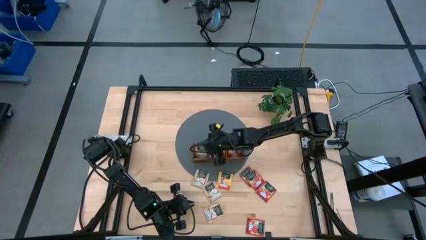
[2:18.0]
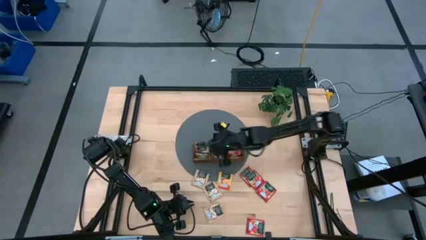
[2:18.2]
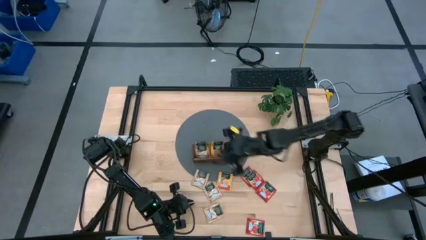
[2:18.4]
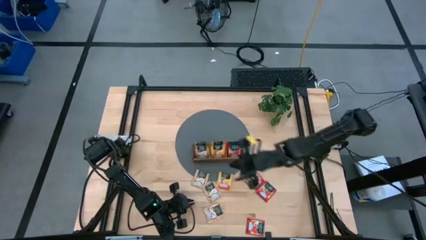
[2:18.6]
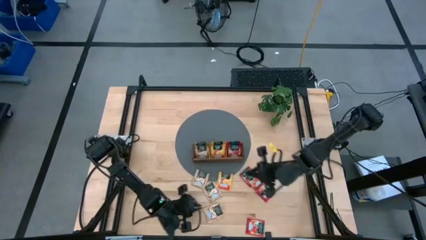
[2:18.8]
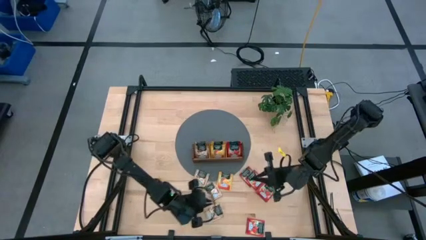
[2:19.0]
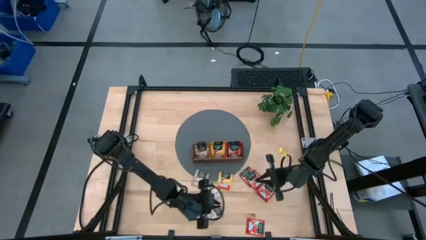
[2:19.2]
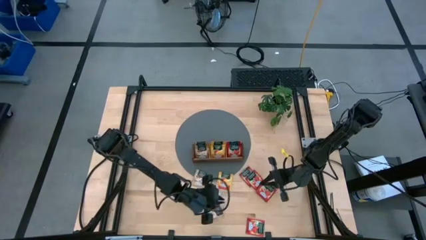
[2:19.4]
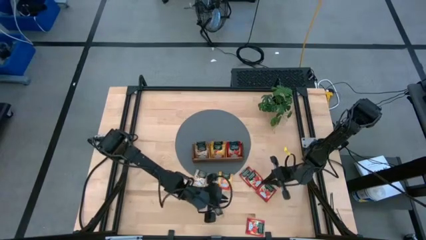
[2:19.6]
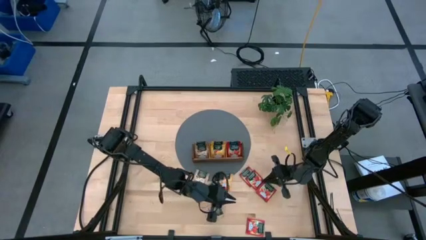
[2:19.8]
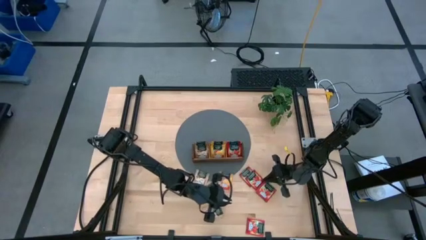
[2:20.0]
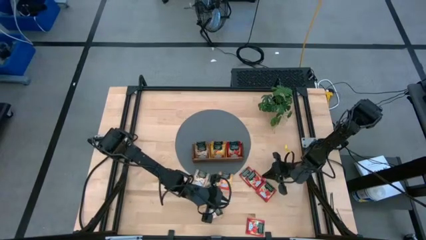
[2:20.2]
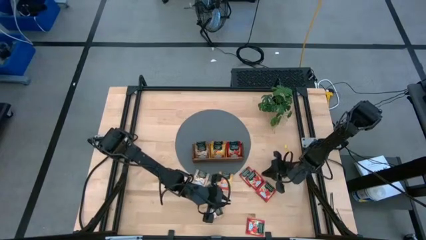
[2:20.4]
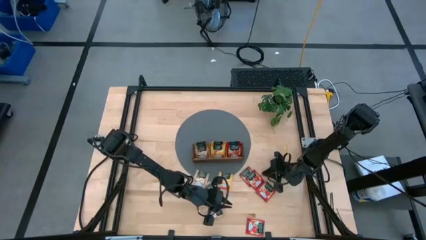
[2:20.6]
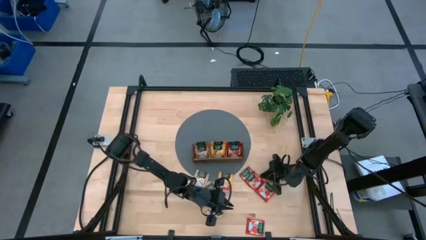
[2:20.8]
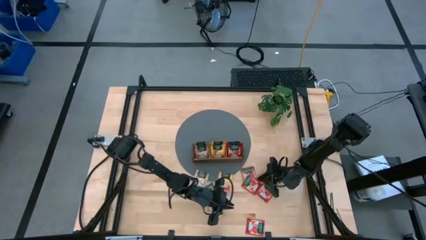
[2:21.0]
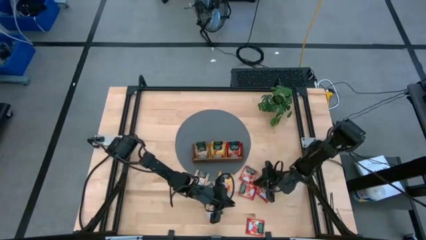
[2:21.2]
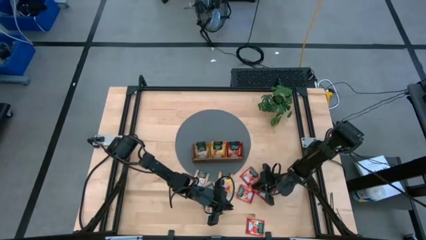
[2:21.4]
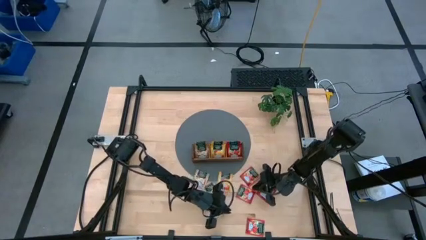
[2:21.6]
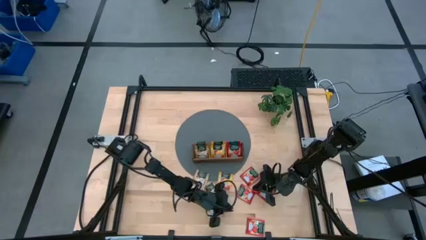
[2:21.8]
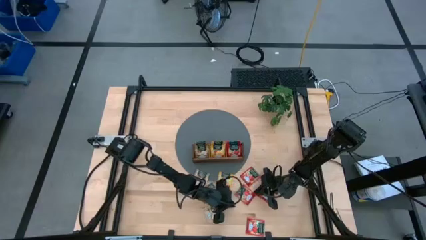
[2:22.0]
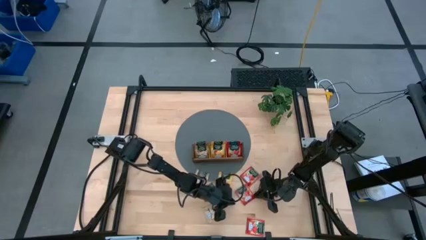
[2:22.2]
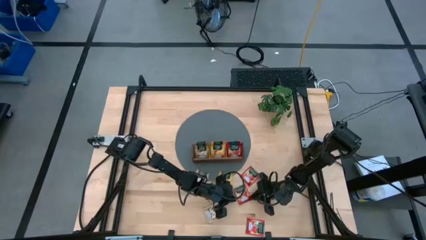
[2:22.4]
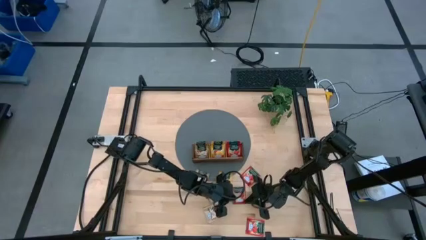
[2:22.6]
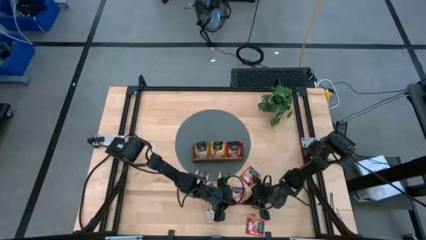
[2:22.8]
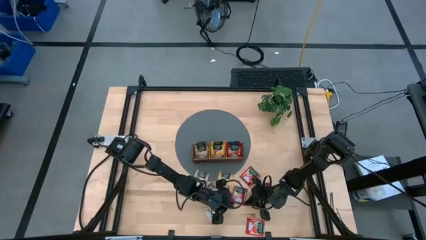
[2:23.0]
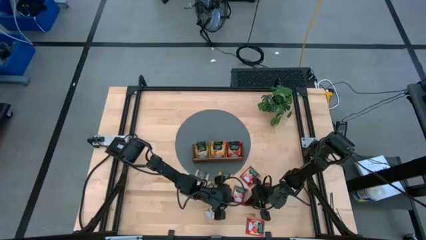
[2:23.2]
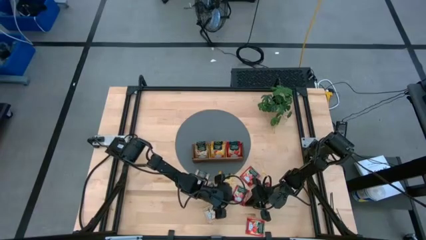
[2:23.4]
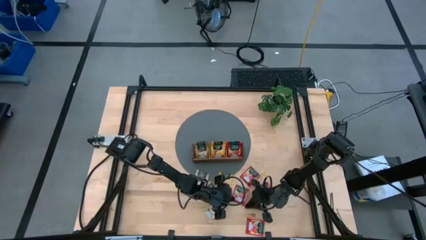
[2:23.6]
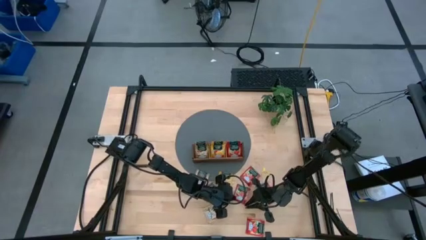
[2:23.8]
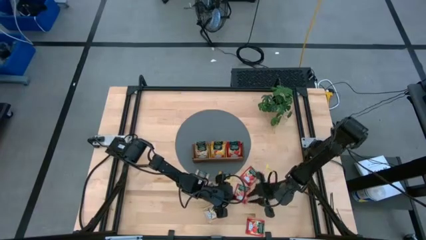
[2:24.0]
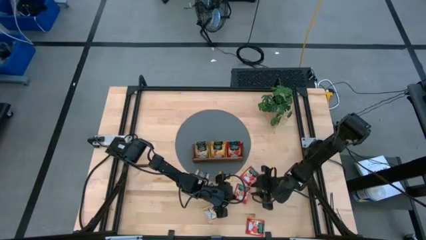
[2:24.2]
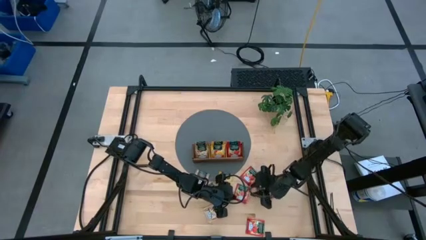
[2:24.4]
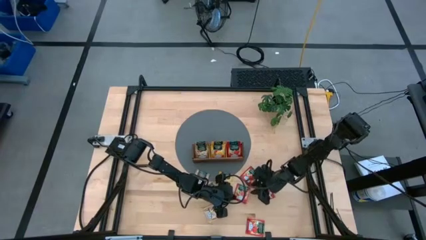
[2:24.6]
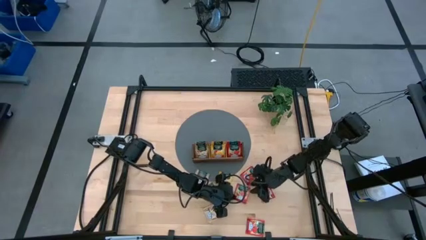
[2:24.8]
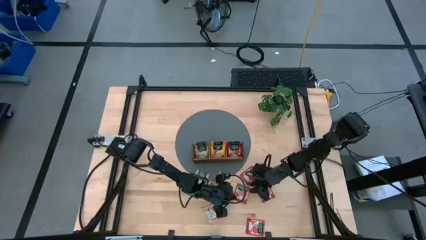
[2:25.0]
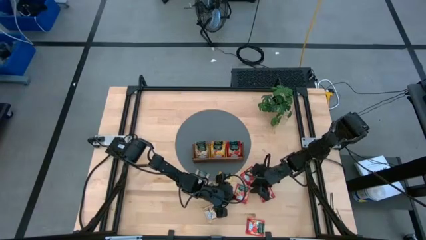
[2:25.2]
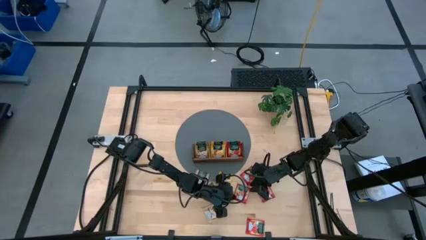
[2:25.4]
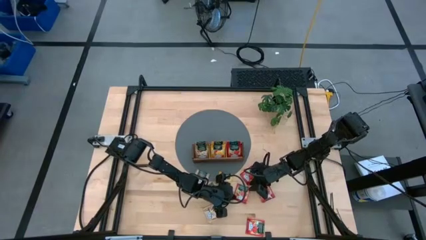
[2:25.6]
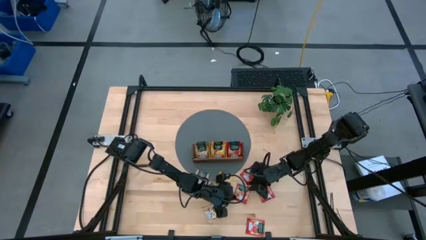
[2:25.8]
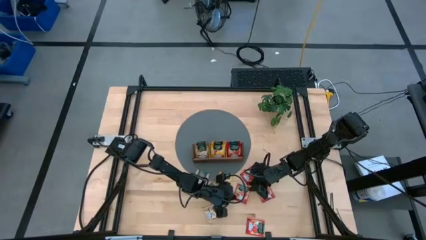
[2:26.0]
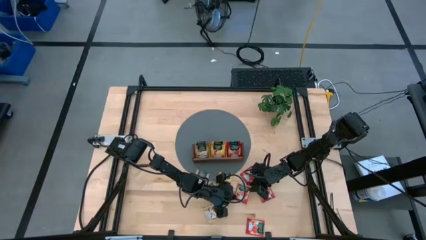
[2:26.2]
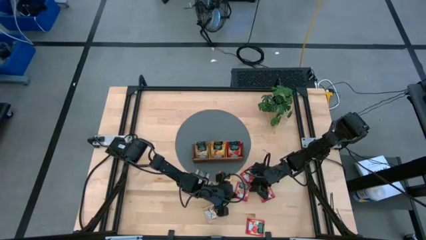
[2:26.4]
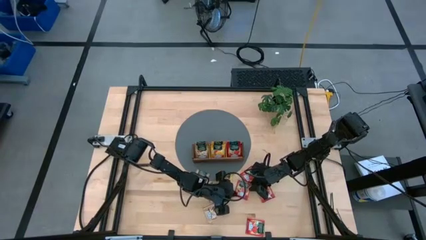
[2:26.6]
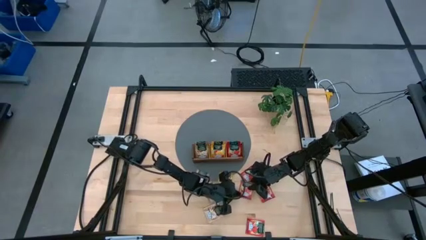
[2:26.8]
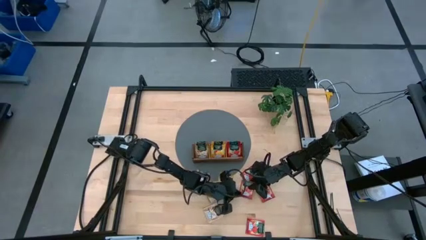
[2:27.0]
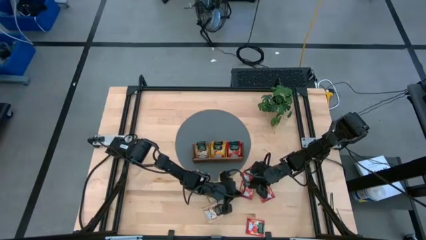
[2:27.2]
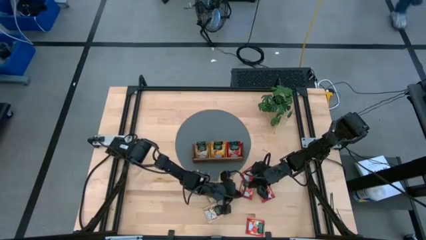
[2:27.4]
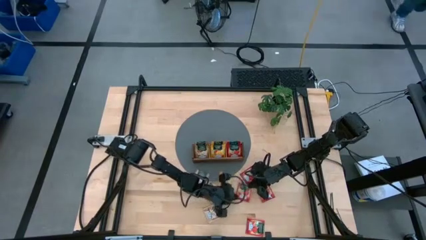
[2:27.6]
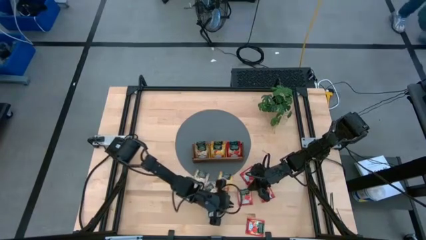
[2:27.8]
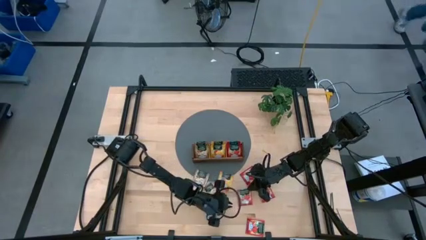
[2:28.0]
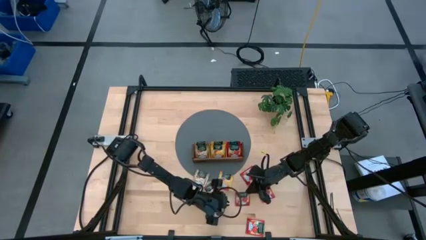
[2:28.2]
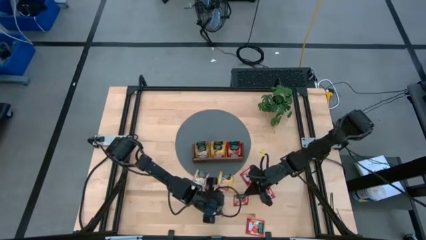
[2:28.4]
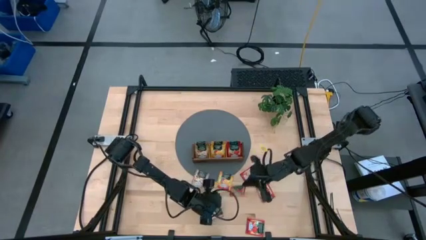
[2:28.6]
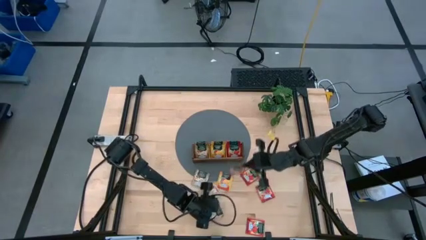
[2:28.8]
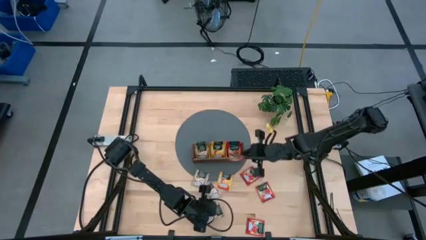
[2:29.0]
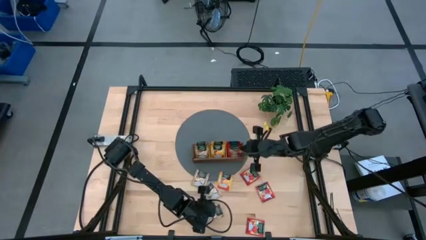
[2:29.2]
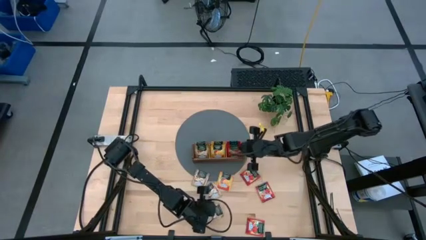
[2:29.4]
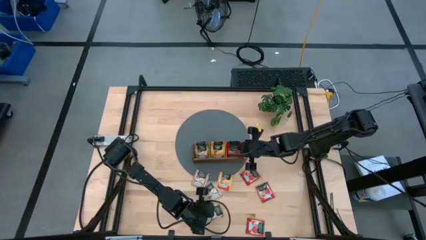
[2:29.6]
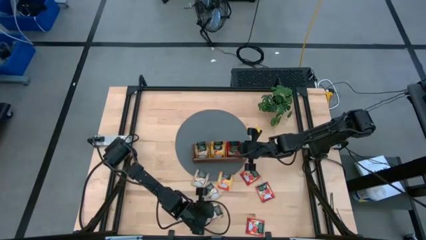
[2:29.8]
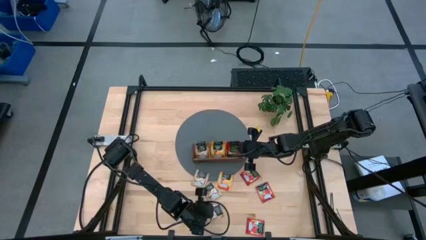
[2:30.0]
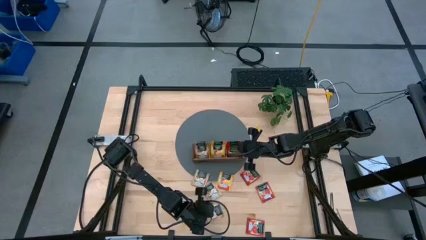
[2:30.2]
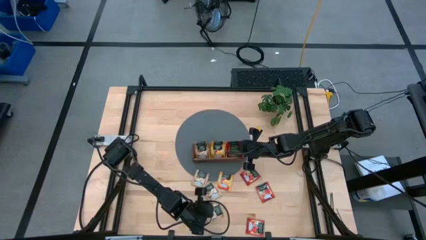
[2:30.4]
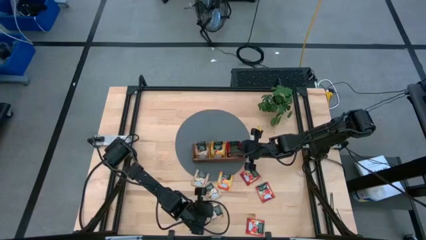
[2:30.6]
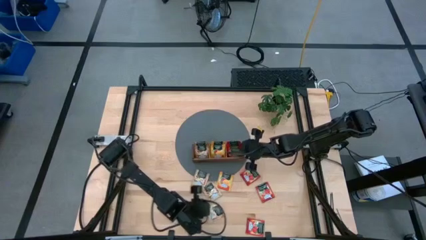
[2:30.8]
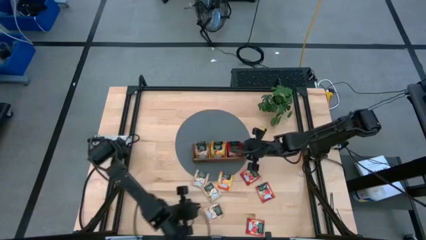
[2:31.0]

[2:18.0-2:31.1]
Task: Pick & Place Tea
Put the red tea bag into the right section of the wooden organizer

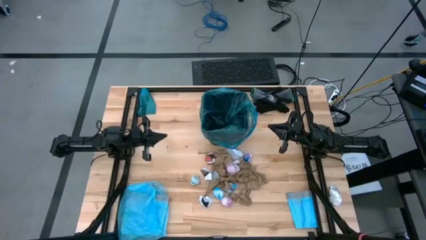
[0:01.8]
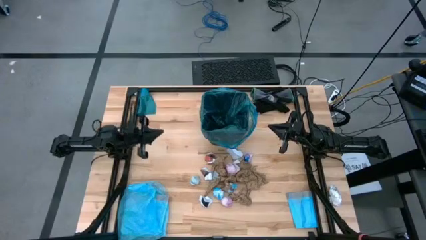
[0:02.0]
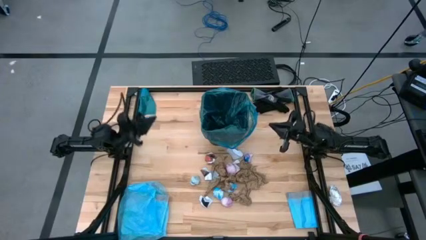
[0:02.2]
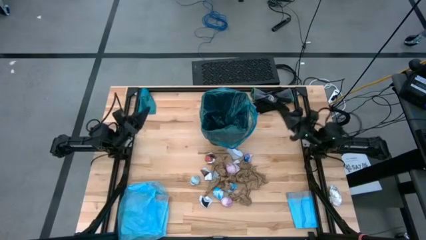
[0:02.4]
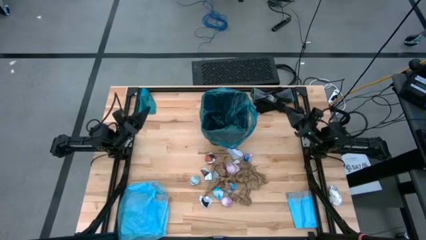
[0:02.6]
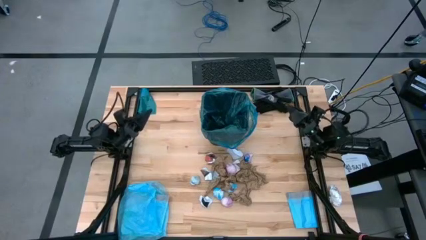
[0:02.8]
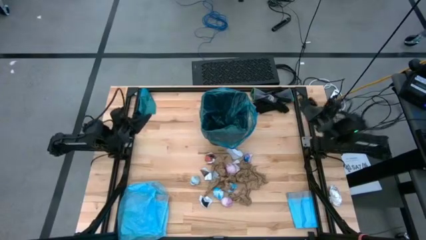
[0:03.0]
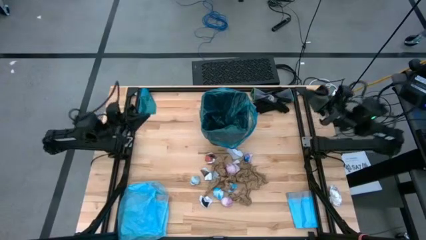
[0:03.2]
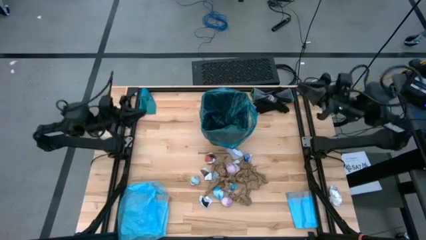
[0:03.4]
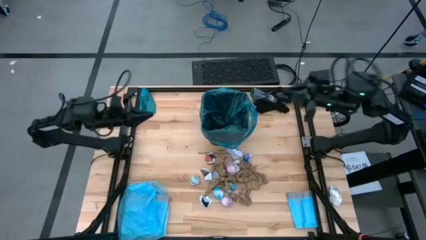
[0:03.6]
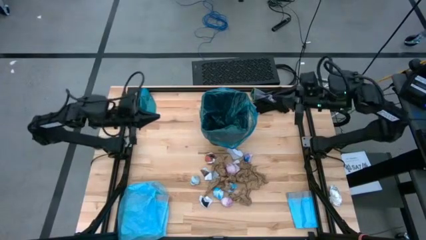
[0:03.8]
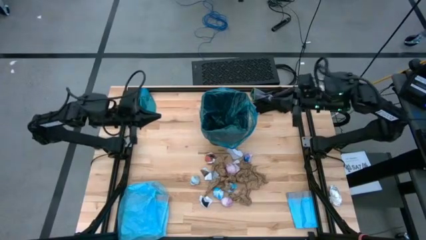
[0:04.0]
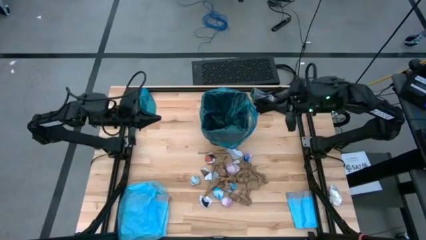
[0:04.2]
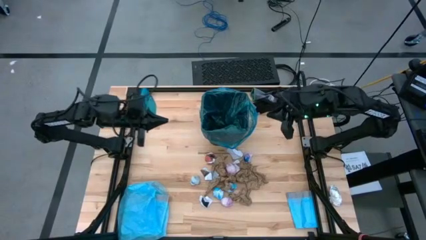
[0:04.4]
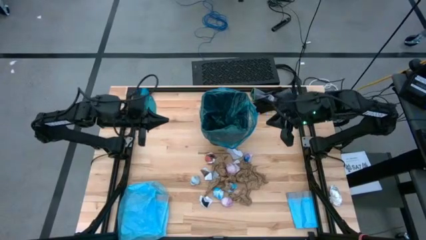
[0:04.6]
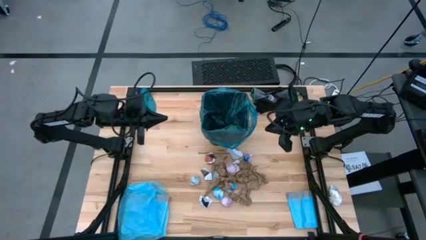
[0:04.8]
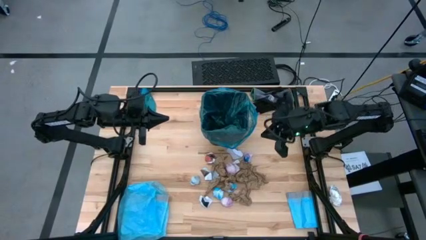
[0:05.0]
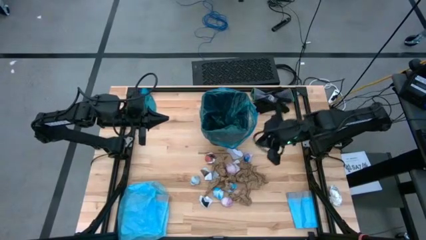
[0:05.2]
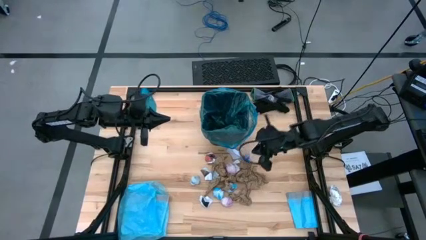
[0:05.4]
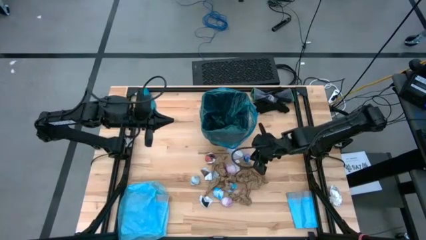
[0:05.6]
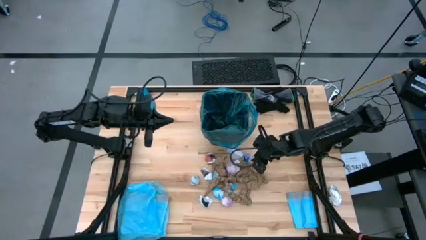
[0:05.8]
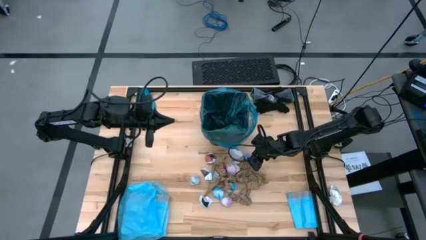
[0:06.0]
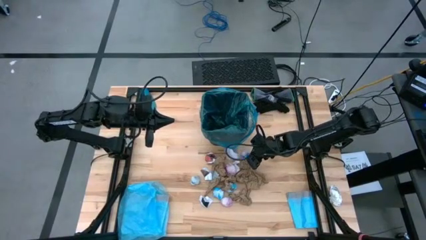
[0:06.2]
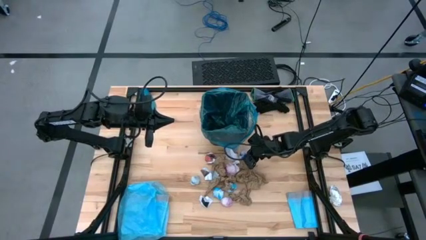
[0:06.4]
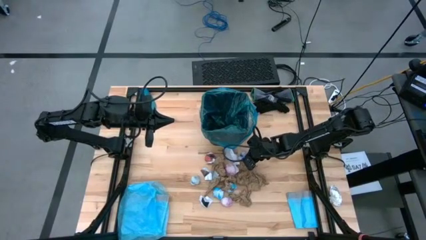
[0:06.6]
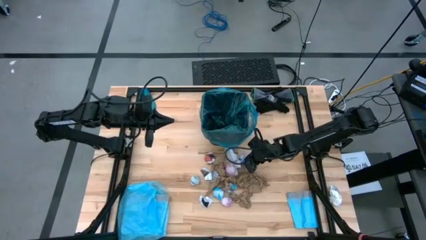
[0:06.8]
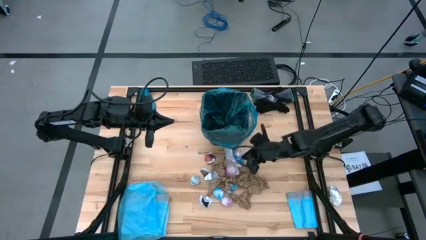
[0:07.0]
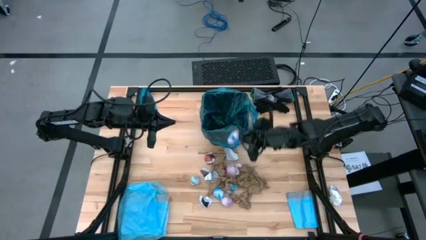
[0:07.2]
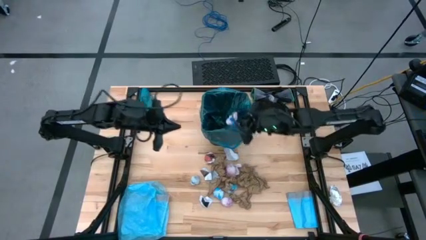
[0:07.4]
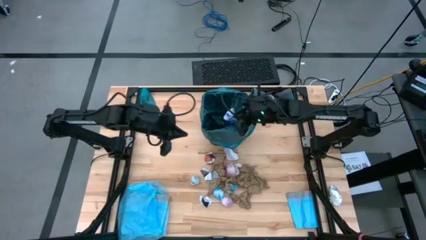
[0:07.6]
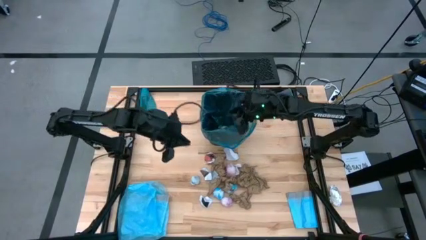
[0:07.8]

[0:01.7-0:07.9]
Task: place trash/remove bag and relplace
Put the pink plastic into the blue trash bag inside the black trash bin
